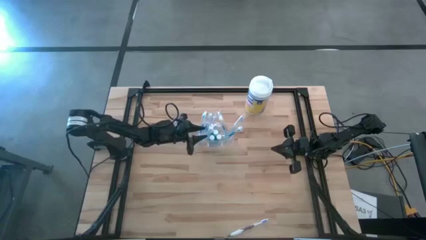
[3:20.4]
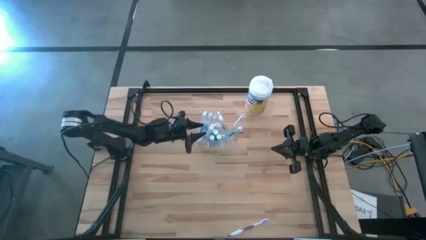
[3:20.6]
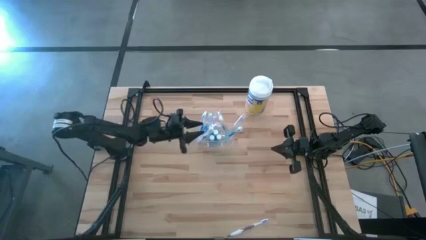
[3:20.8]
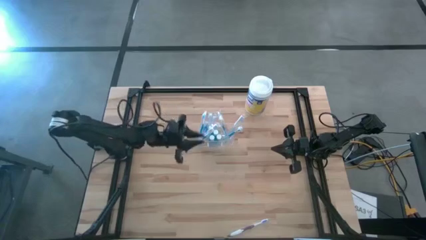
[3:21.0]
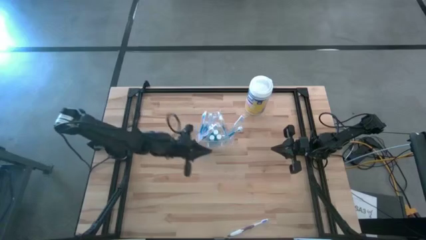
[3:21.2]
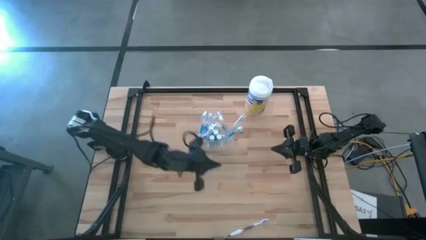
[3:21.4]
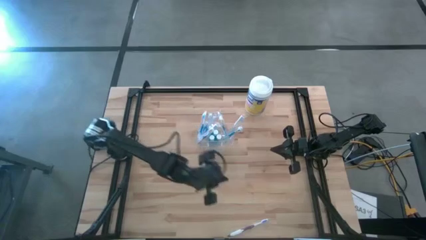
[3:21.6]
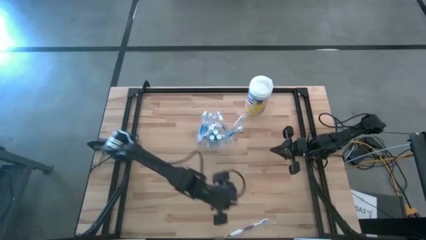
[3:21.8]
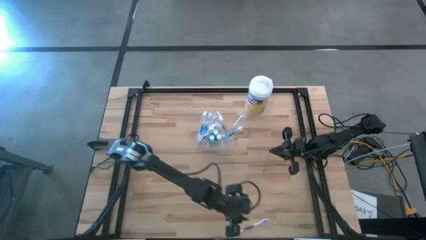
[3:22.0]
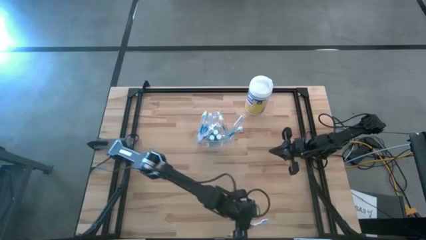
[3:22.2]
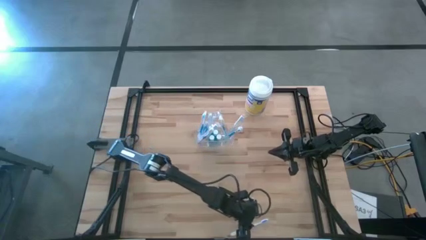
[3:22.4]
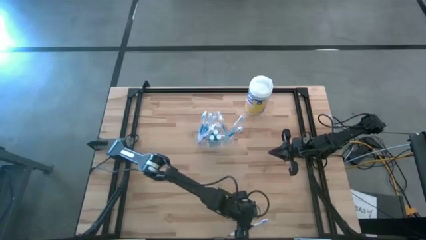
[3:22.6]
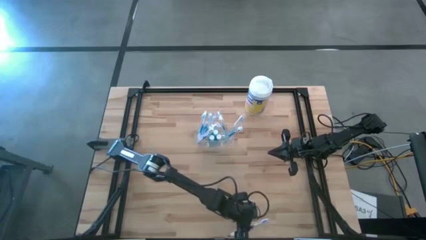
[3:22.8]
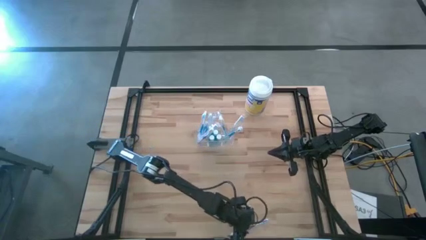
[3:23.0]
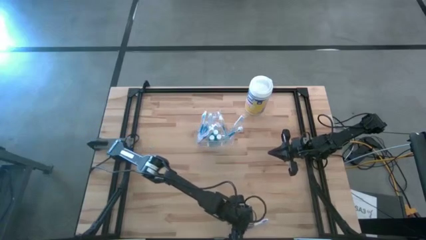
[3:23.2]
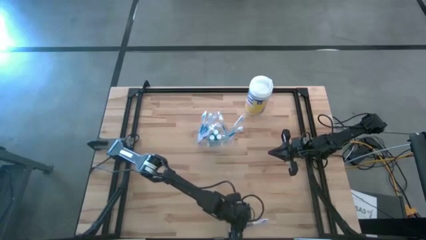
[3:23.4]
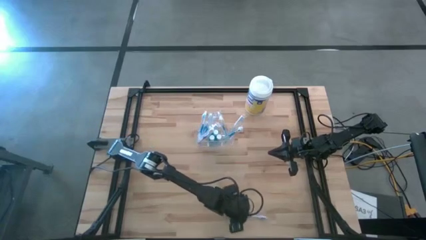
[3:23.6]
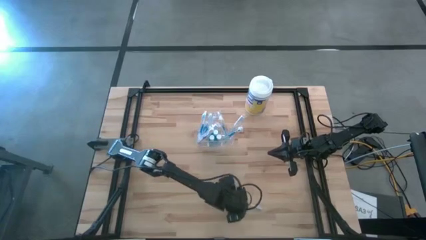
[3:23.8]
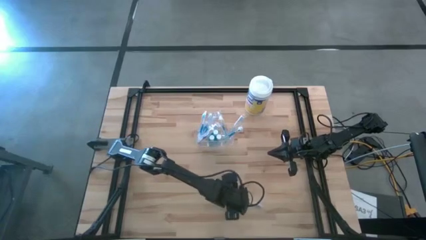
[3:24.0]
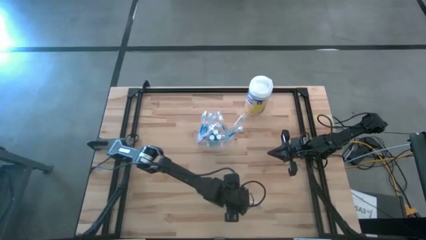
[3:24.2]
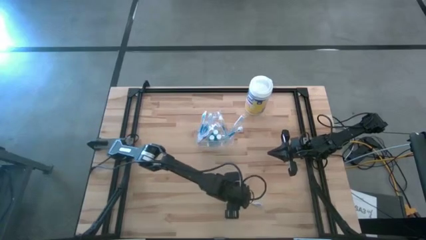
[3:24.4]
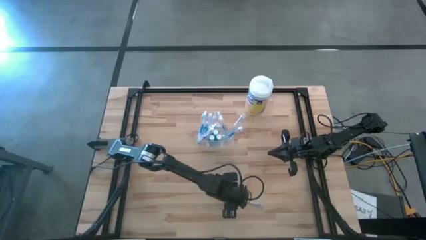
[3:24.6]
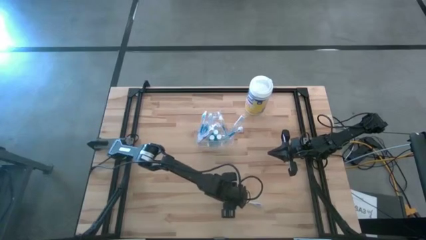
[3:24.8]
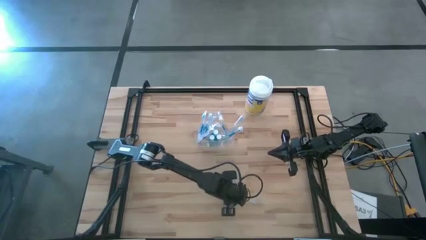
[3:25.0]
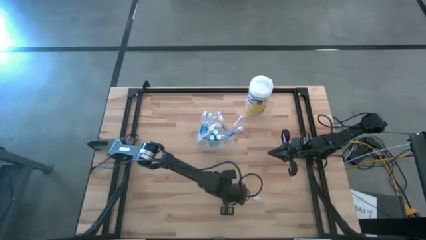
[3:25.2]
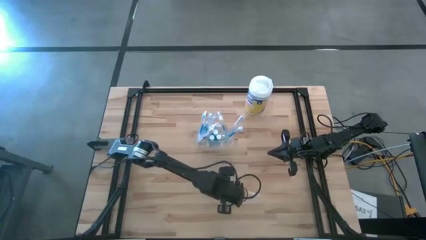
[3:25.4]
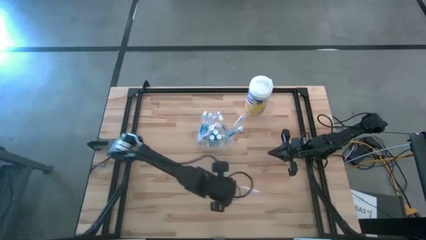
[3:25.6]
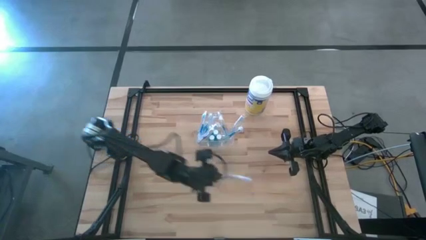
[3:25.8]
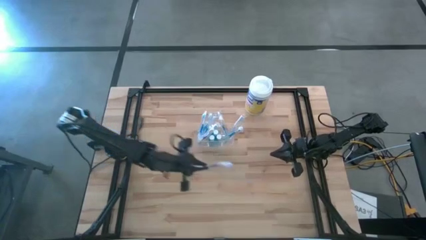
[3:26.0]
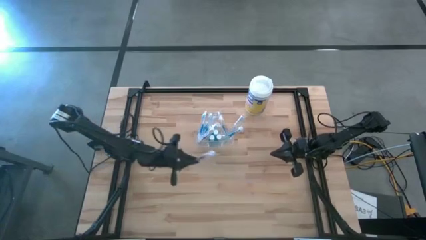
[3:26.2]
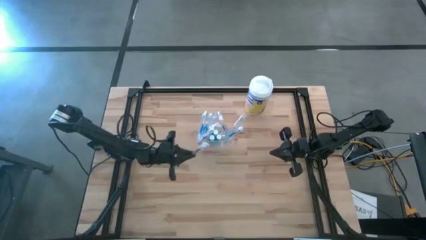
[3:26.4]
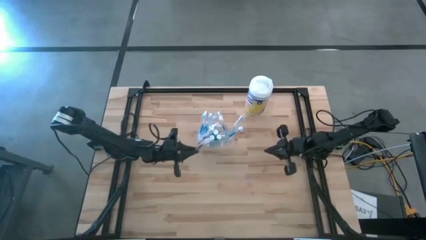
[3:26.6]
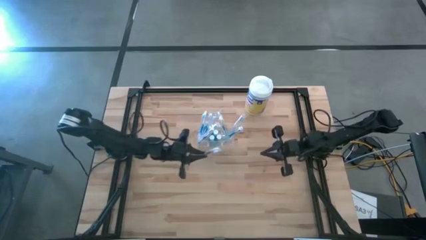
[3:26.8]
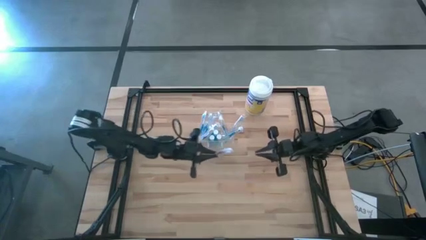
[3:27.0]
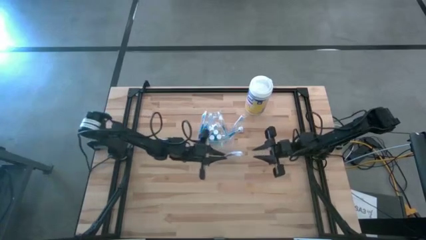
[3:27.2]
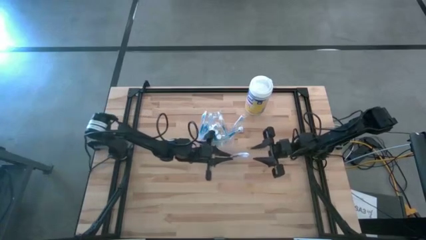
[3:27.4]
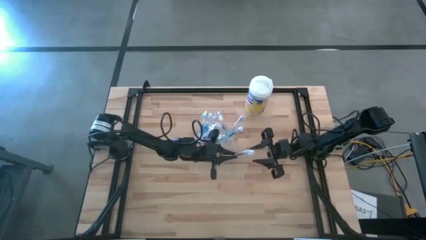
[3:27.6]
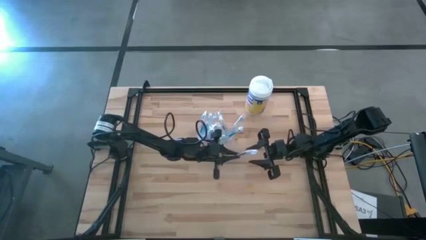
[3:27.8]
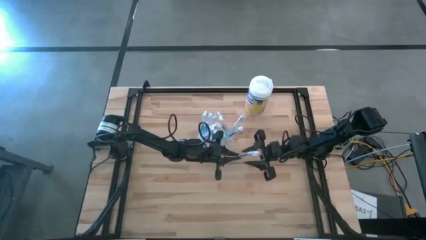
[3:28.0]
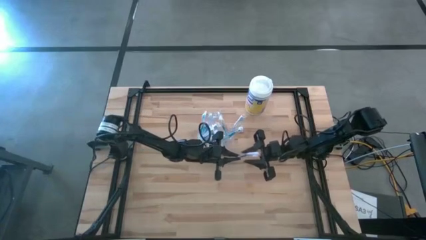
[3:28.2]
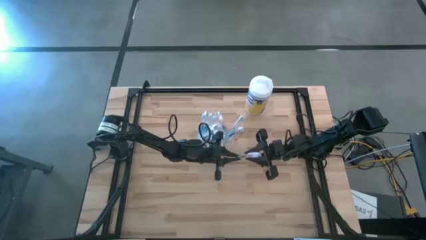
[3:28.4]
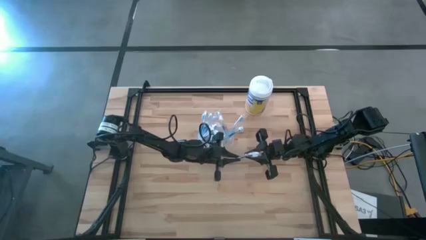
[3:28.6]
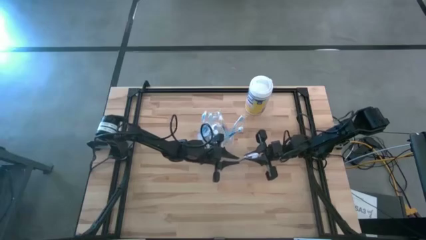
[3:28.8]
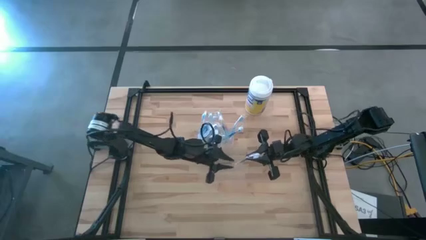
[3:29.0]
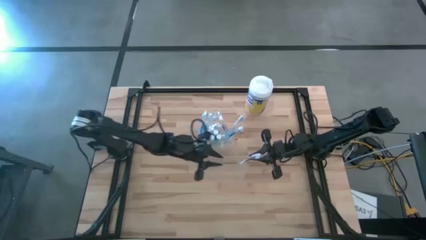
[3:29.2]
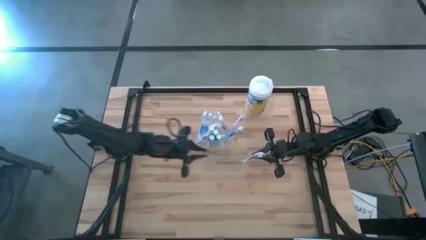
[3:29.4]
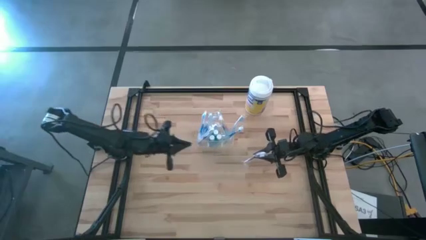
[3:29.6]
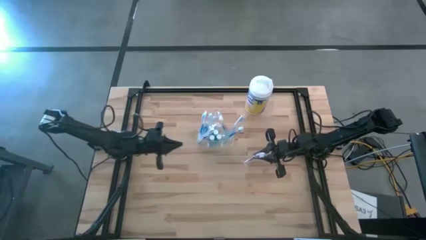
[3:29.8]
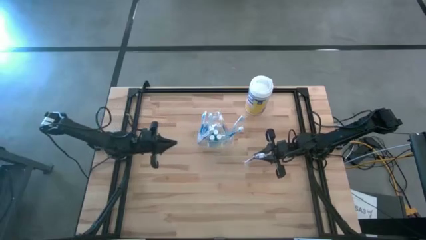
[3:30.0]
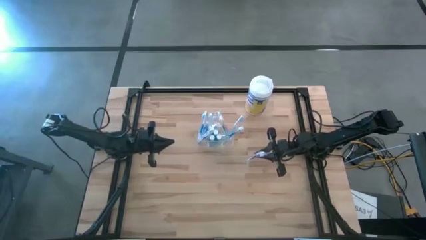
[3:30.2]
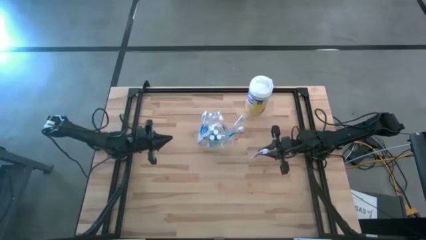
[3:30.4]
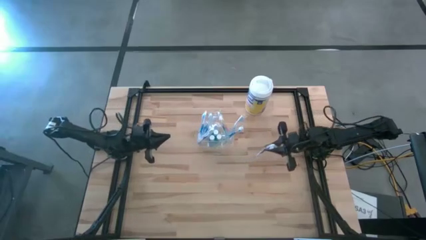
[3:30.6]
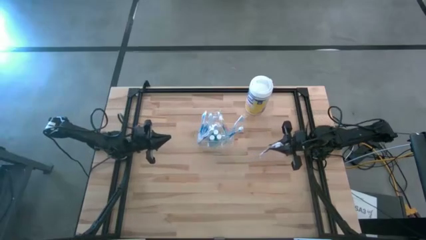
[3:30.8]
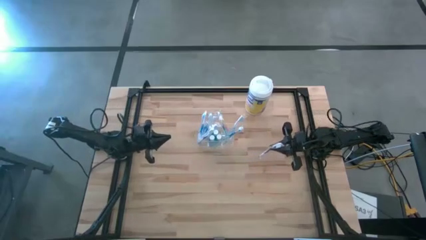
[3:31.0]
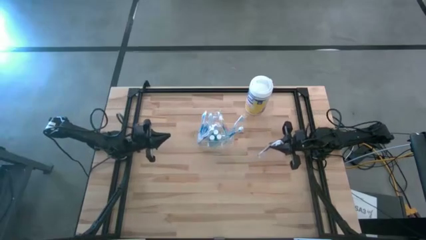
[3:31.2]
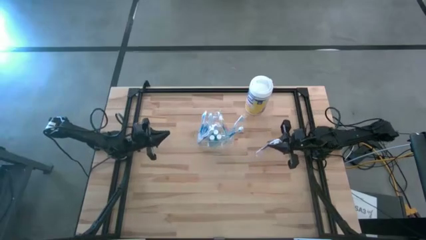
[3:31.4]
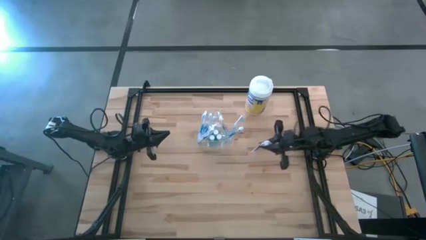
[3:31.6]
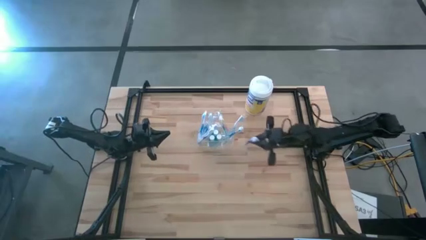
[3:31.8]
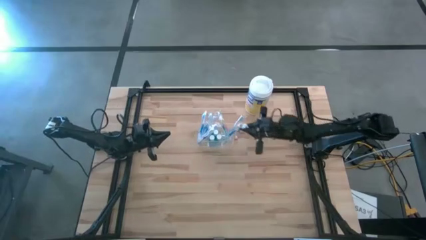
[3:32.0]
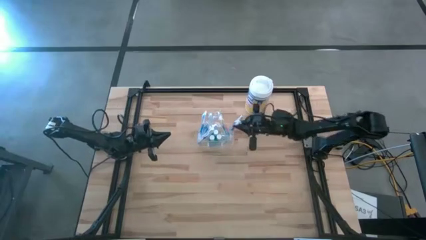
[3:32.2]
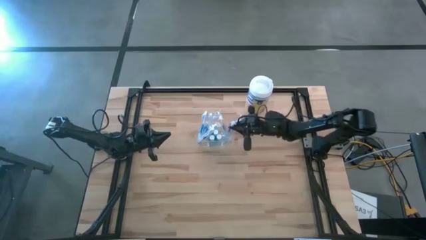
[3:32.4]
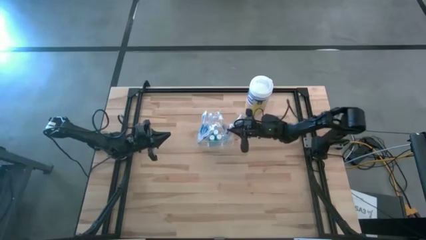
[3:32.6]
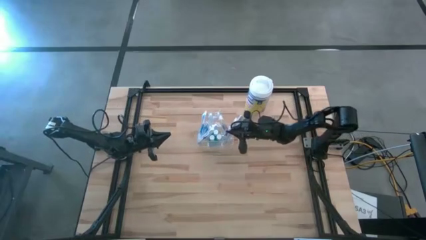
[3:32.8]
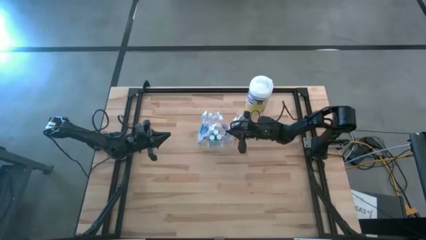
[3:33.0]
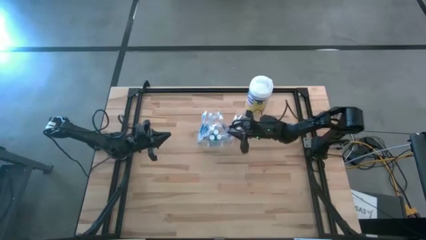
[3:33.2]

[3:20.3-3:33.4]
Task: Pick & Place toothbrushing station
Put the violet toothbrush into the transparent organizer
